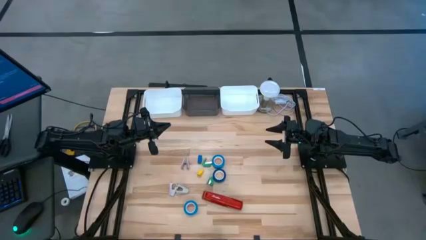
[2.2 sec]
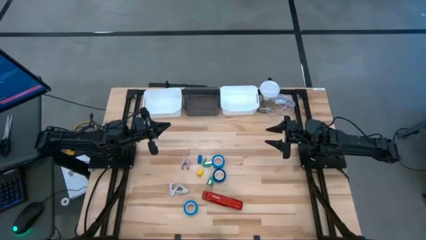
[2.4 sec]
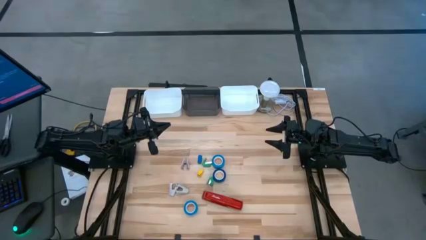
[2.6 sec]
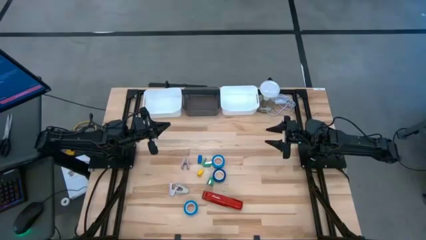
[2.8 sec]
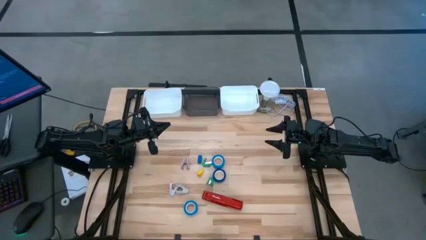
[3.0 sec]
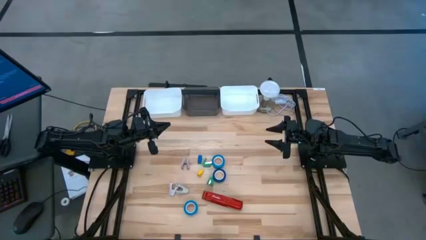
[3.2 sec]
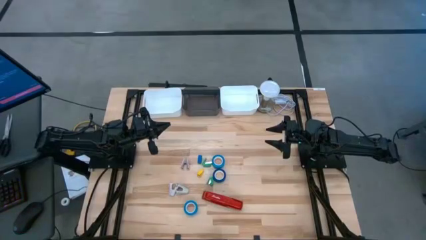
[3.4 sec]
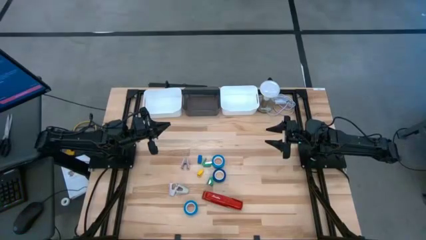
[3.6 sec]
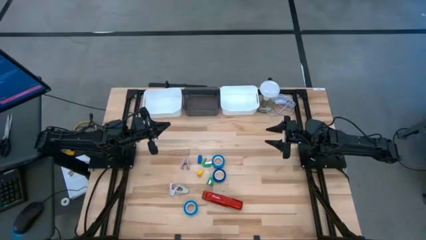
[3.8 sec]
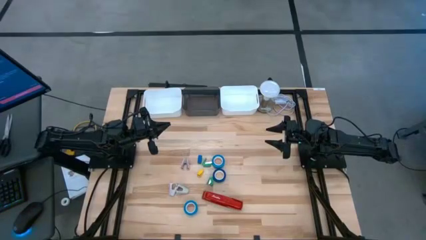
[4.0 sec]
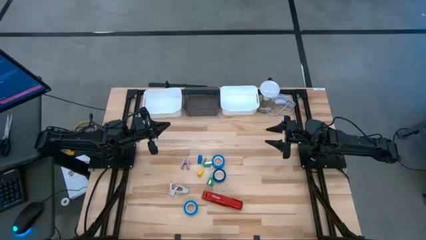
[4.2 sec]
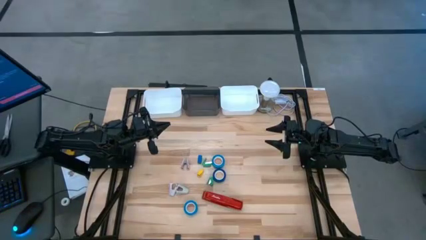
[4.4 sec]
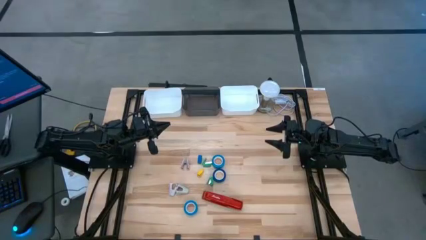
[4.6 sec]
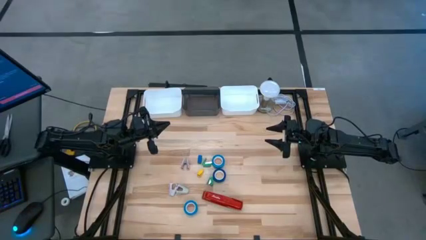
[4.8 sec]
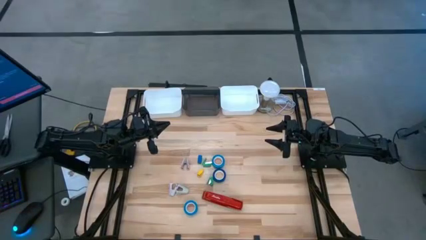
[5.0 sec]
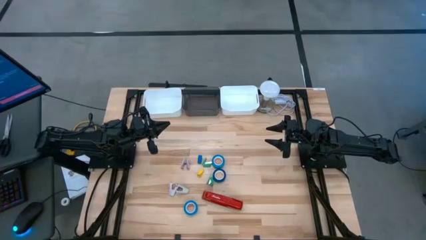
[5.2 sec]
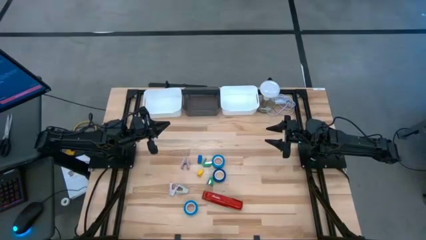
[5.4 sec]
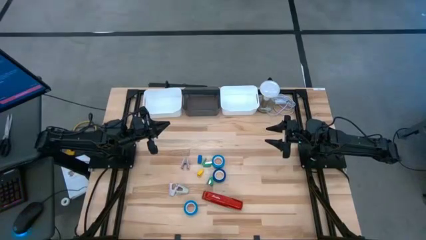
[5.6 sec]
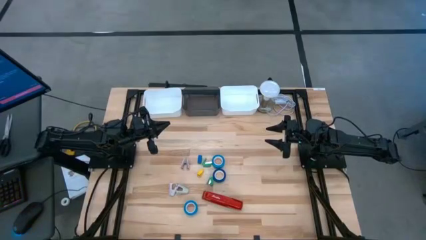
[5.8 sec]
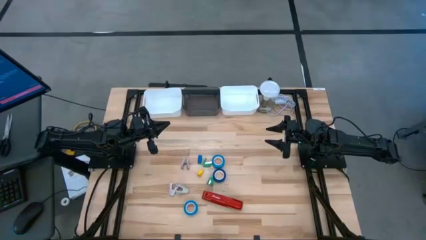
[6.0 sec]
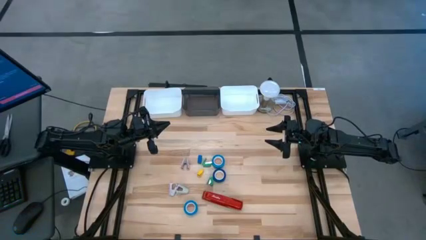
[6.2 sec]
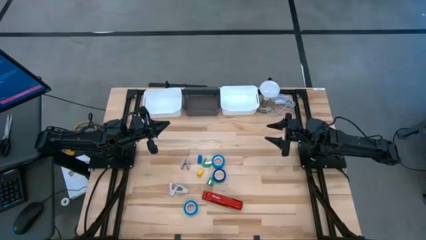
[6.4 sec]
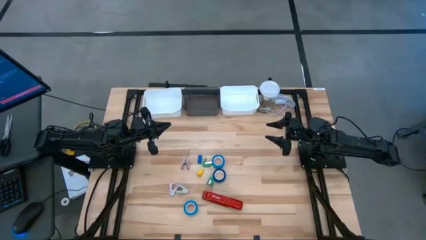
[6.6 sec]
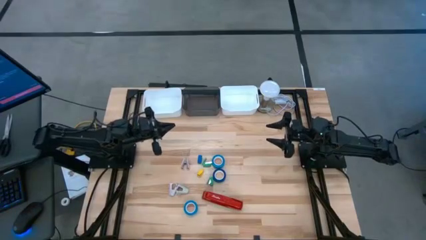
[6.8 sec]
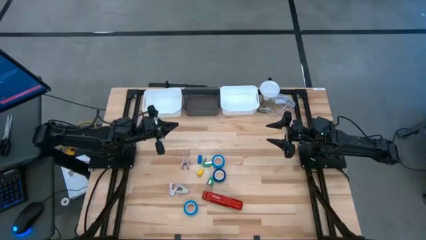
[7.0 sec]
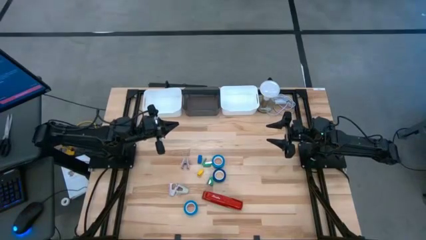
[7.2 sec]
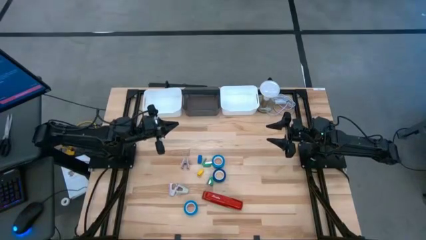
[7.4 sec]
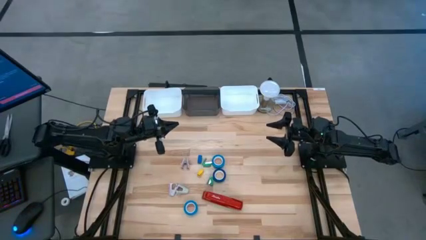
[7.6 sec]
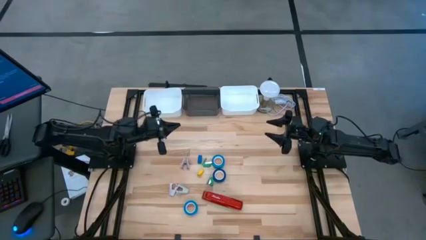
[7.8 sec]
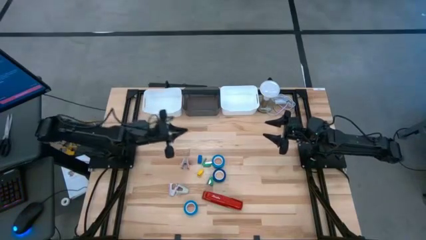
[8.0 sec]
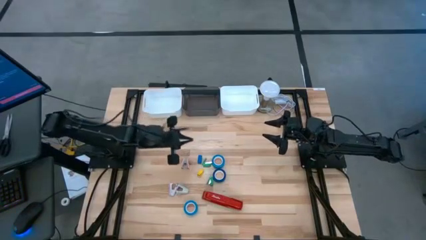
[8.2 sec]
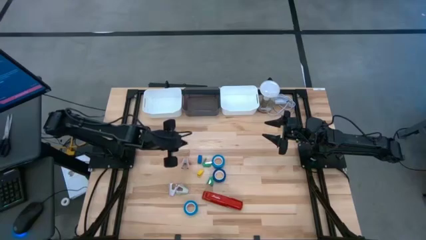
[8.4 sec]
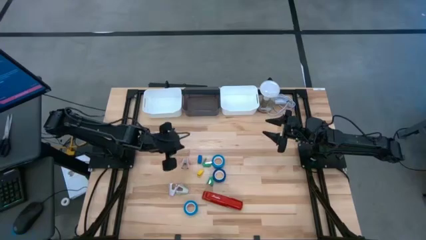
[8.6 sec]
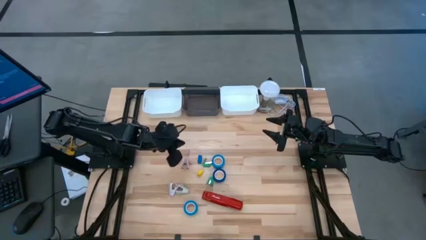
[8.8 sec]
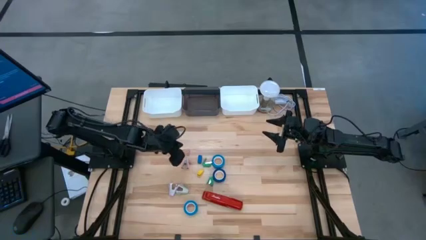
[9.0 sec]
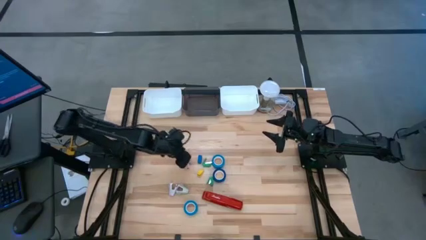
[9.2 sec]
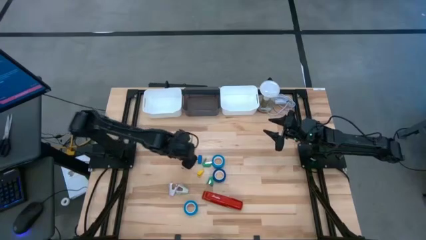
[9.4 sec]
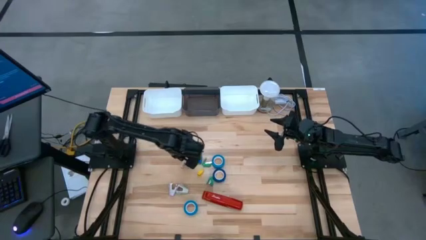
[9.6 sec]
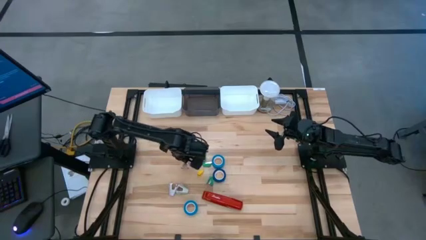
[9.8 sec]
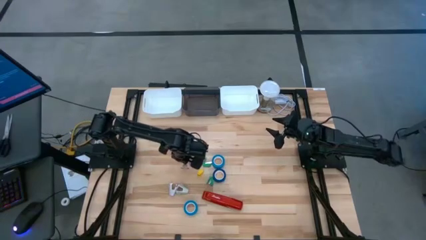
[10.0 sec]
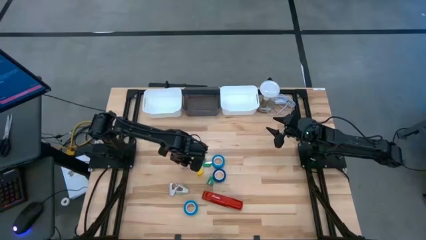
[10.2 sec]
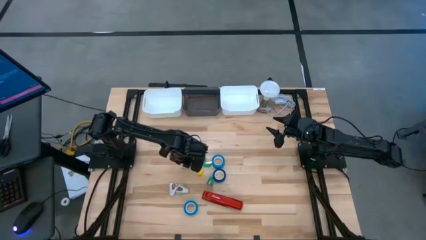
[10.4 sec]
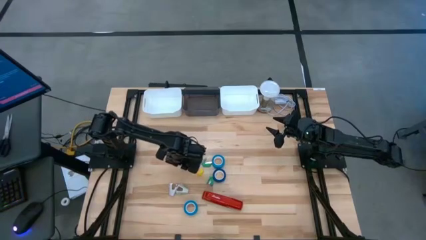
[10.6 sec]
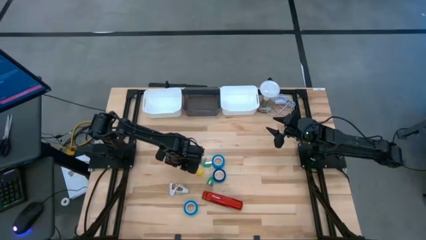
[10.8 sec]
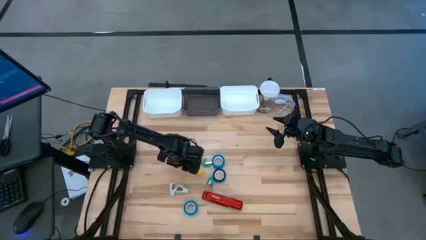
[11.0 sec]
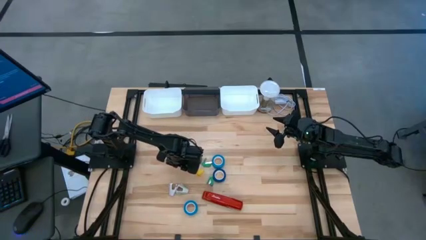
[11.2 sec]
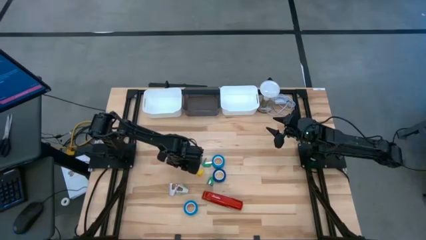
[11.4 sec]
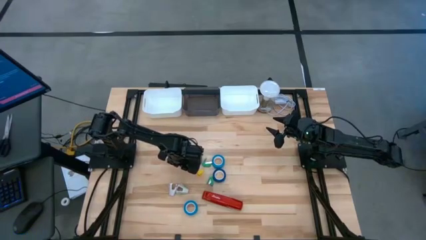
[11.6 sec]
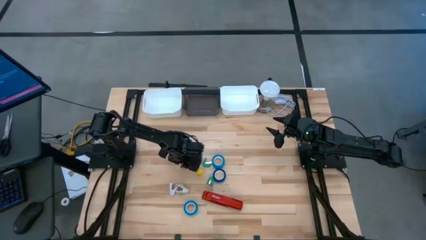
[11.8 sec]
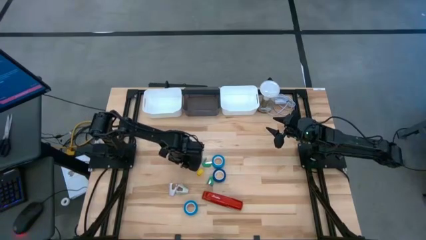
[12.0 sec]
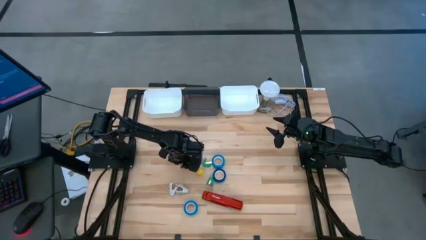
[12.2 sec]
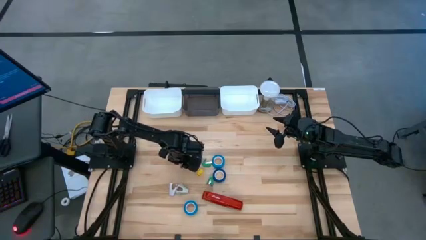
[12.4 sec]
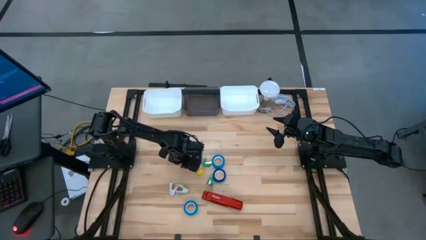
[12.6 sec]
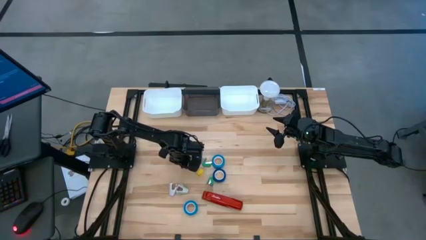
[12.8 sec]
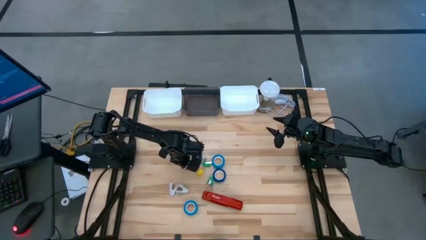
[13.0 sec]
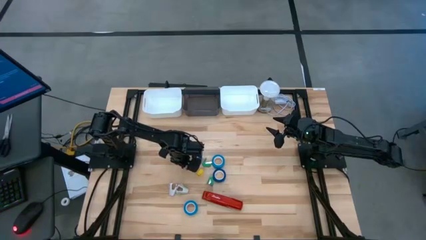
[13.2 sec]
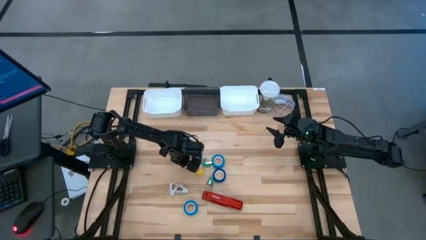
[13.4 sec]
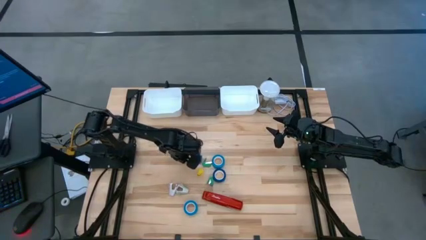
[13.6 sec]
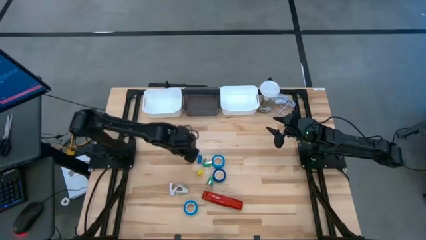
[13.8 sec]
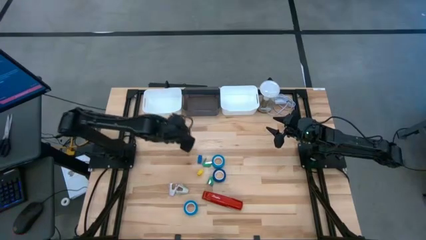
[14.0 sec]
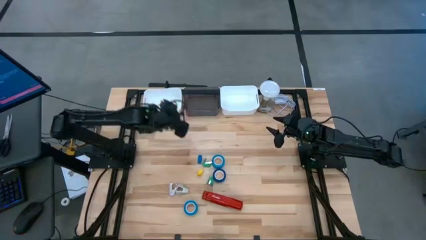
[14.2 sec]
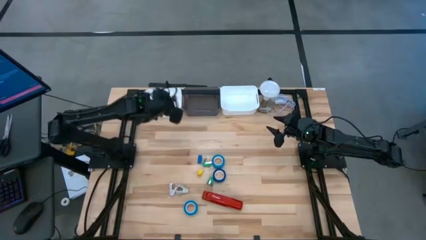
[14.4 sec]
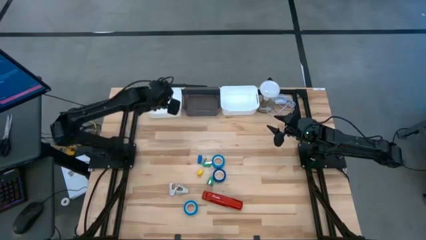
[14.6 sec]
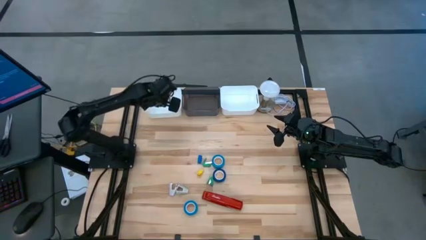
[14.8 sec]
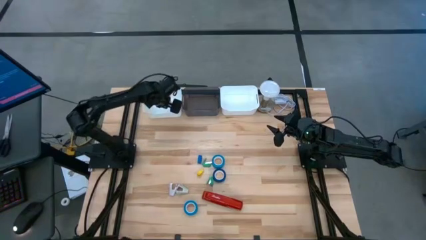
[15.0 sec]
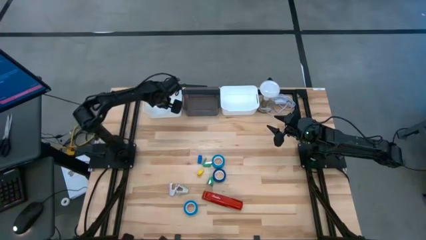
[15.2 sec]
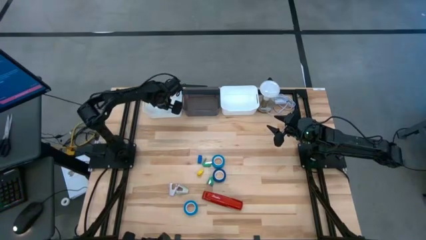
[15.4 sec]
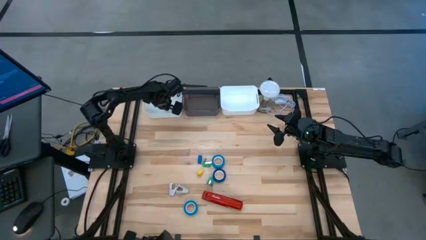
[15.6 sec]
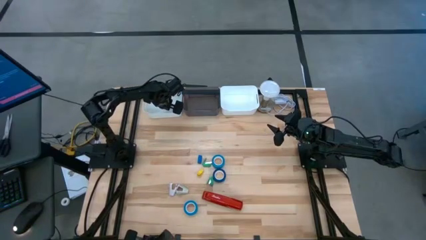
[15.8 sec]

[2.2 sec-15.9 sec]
Task: Pick and place Stapler, Stapler remover, tape
Put the pink staple remover into the left white bin
